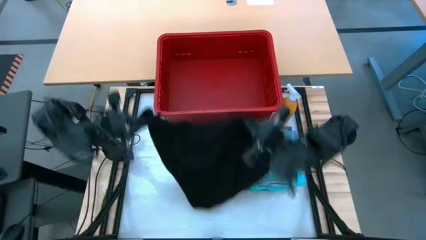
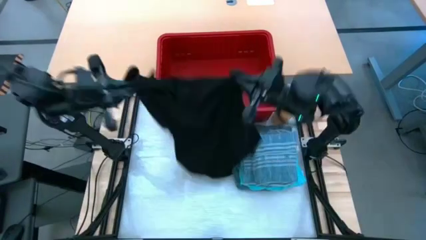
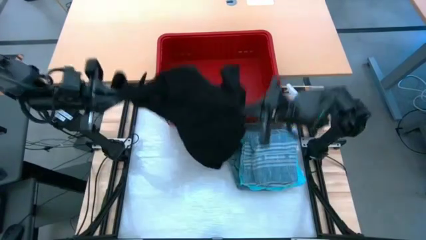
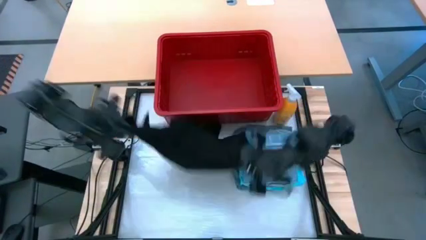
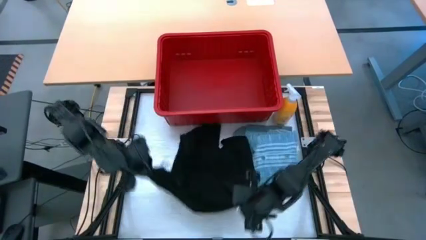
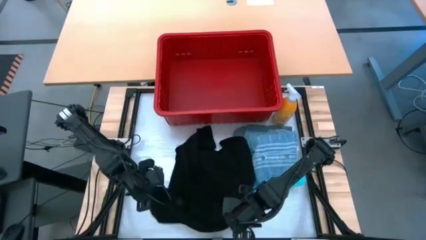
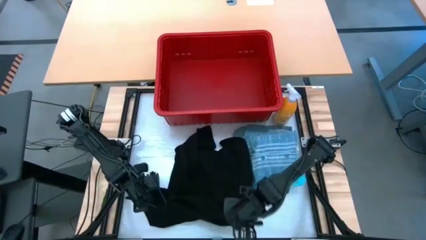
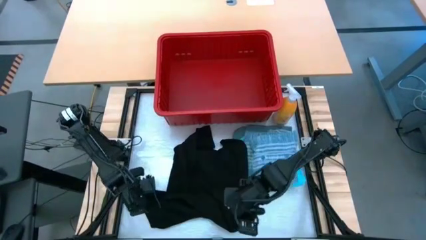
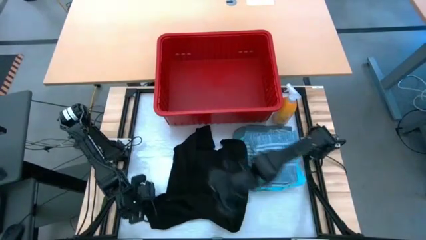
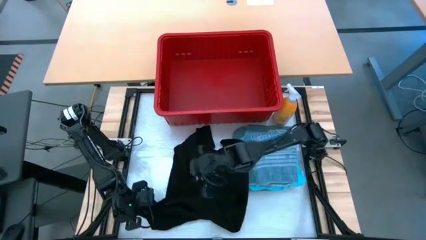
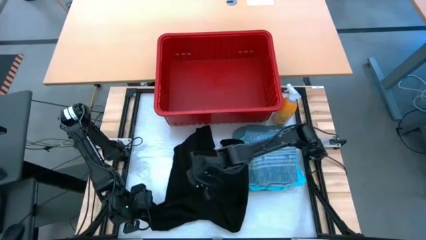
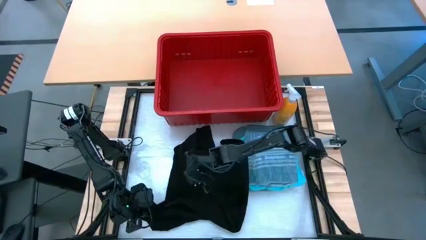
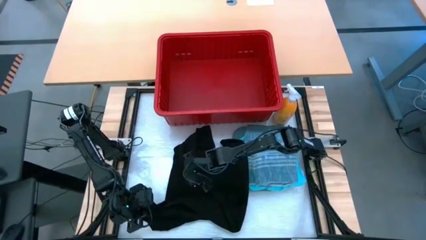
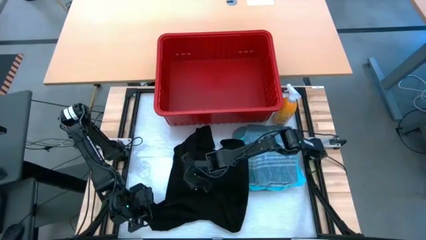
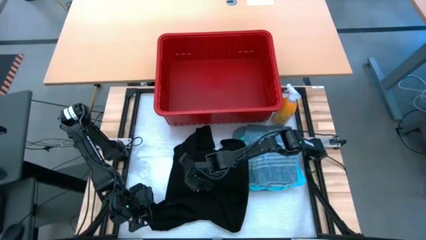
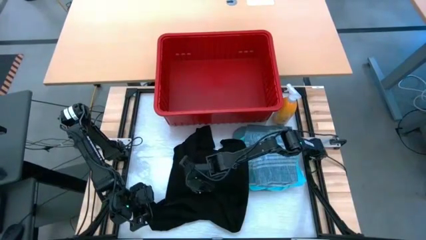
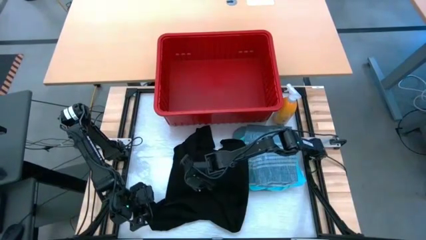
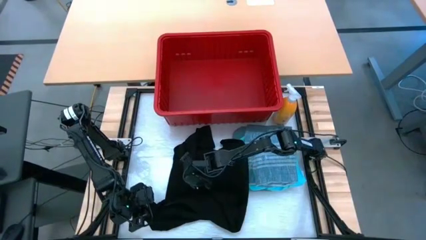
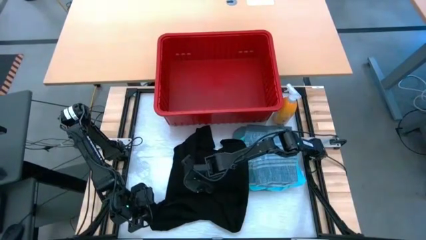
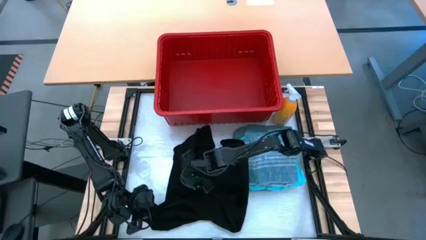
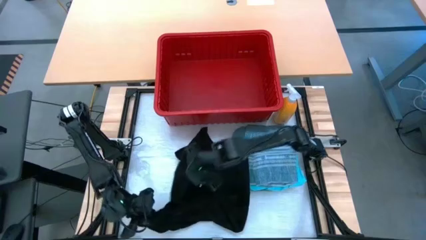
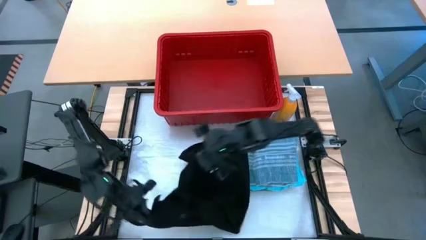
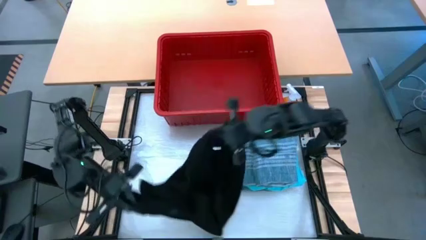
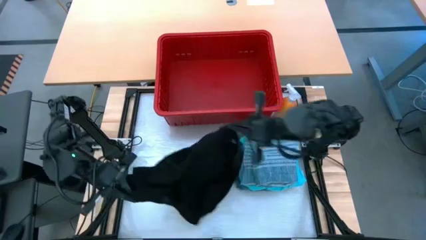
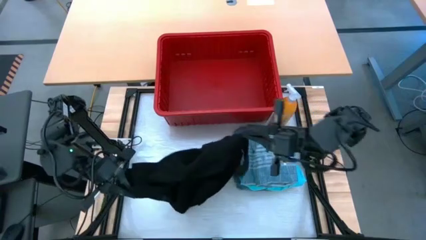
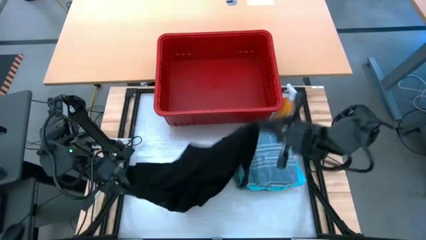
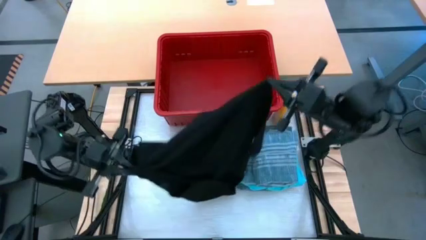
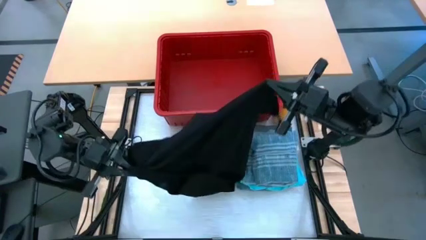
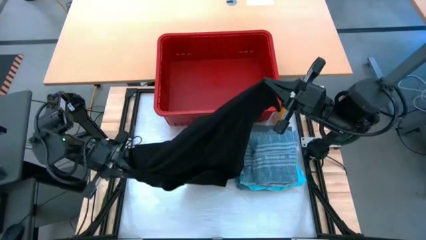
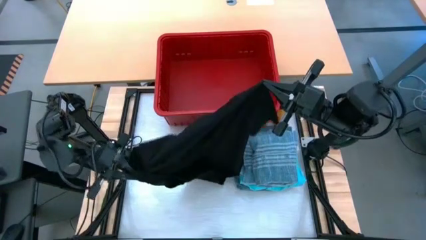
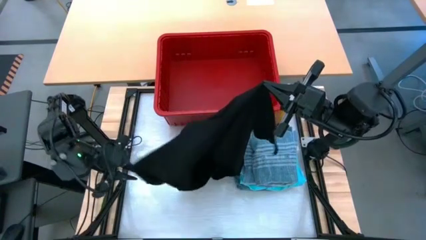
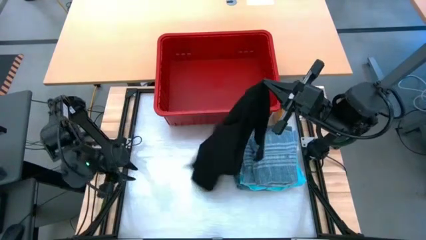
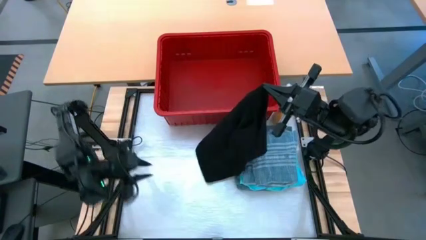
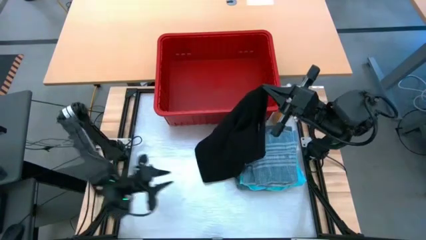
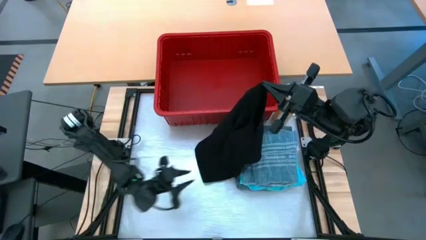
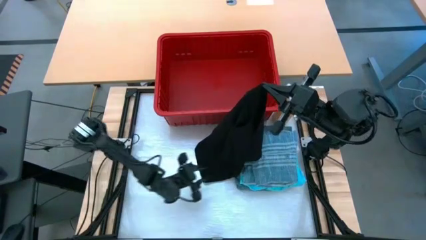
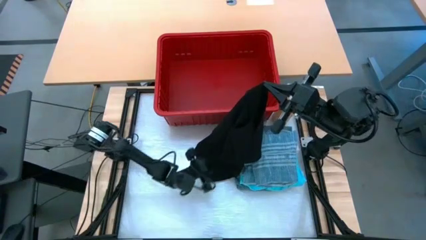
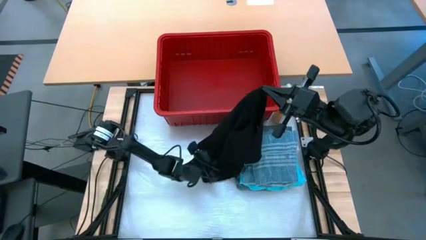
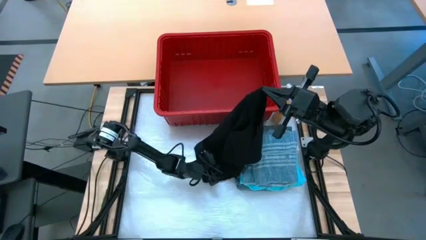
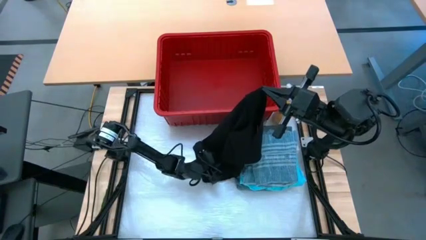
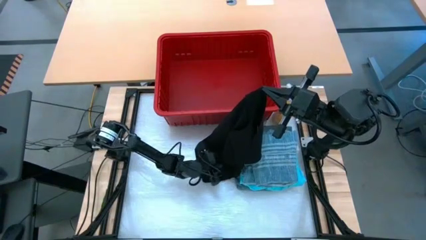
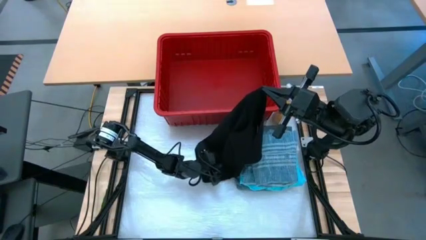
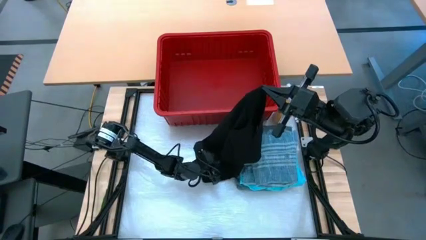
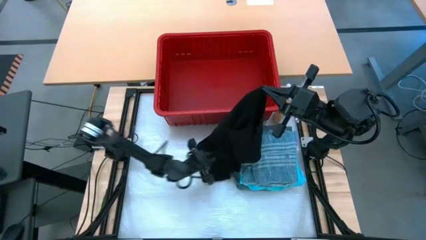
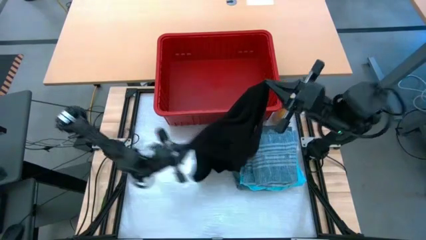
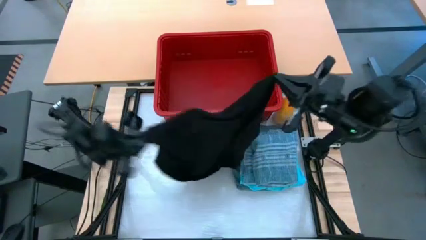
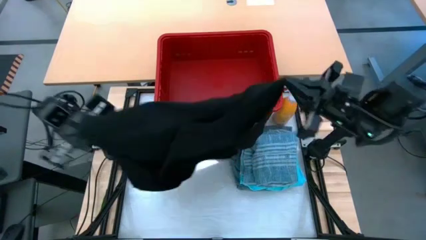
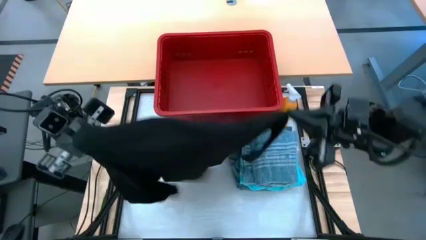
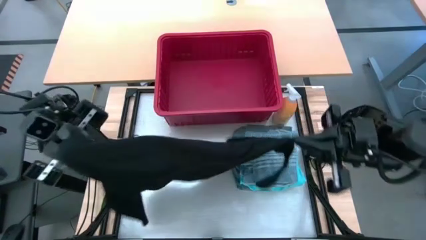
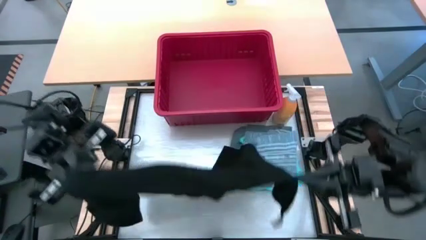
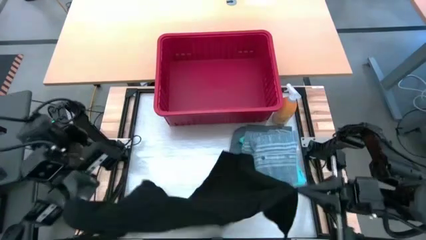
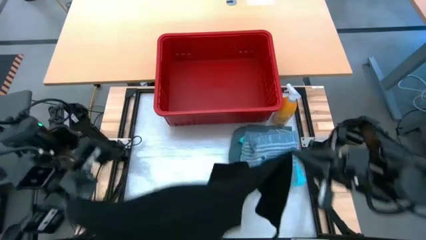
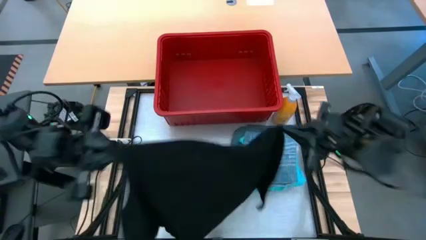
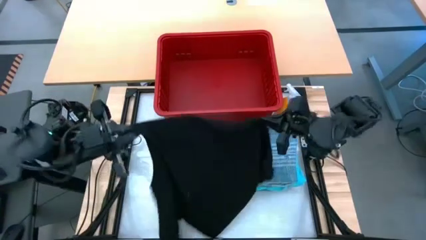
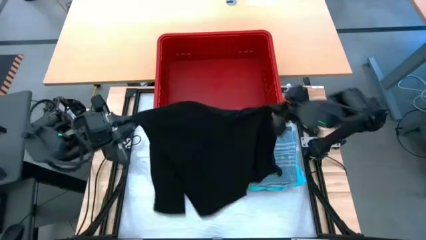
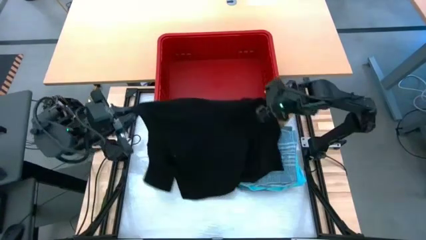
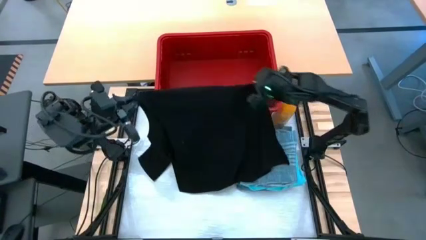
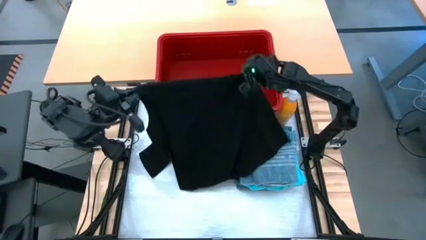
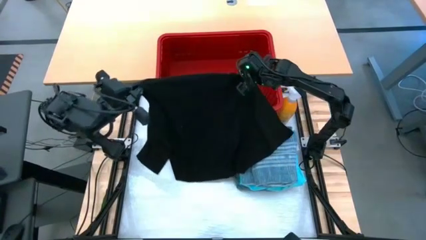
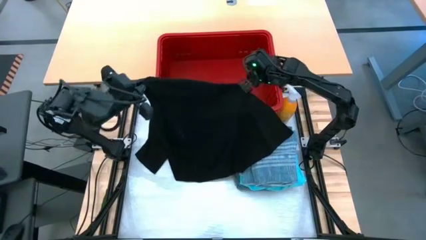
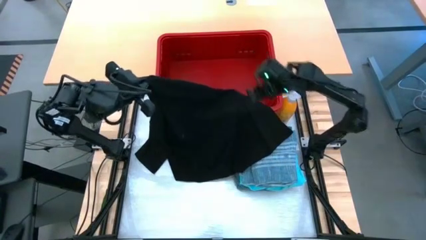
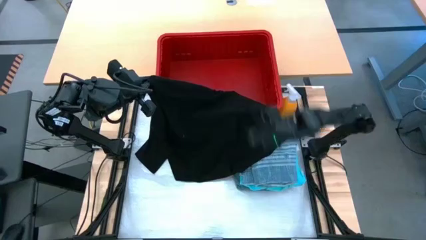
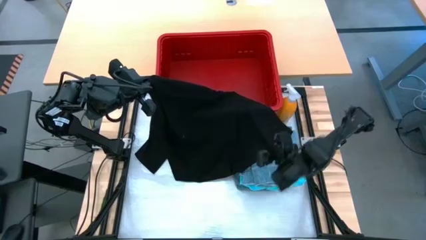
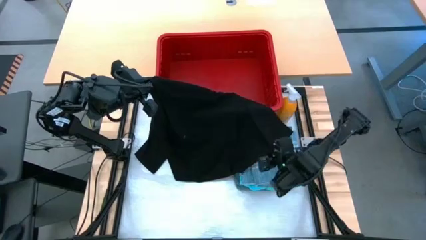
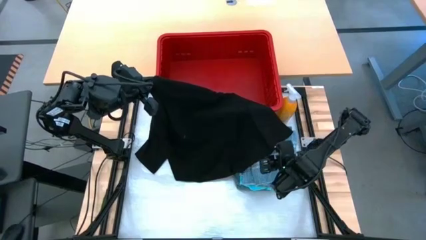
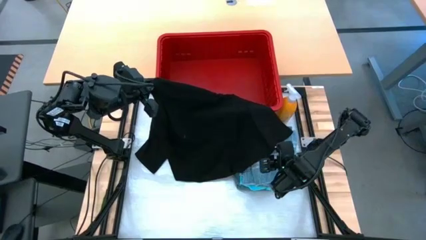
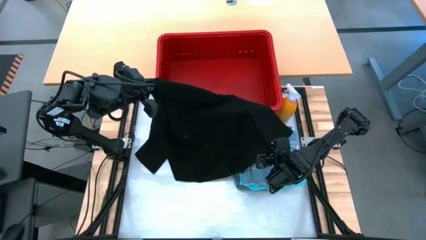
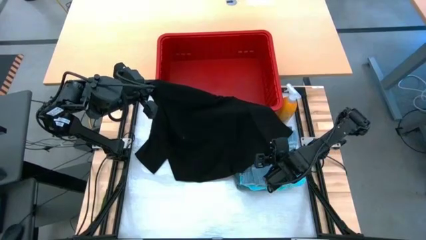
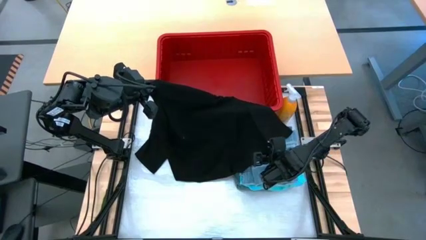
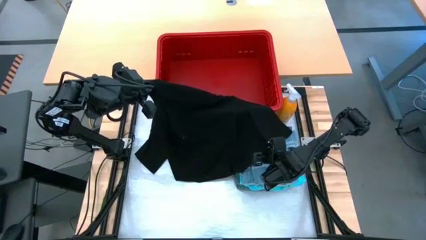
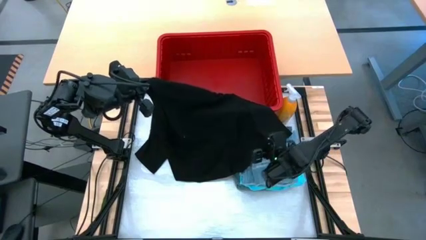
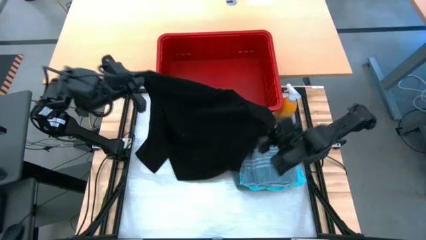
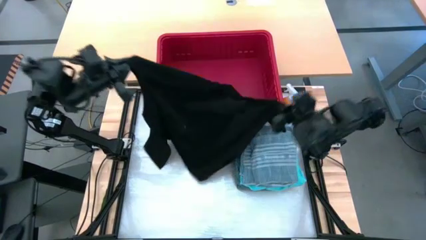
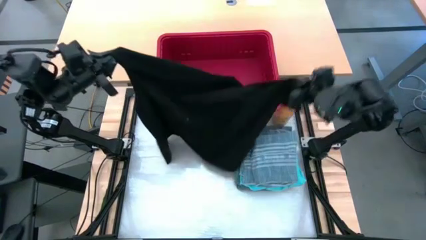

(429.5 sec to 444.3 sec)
Task: Fold Laundry from Bin
Fold the black shirt
